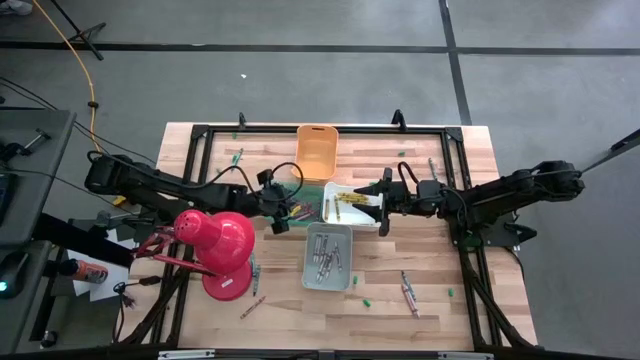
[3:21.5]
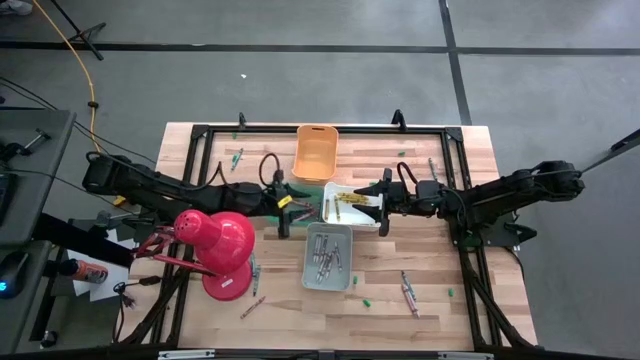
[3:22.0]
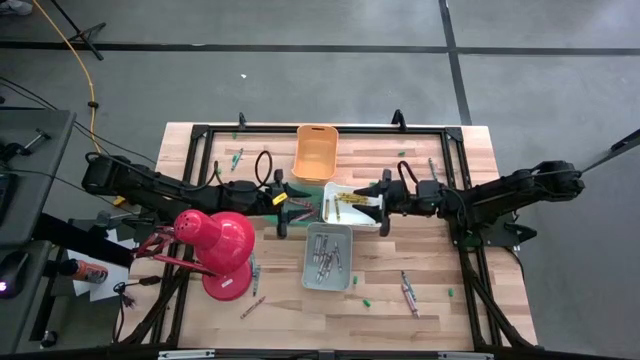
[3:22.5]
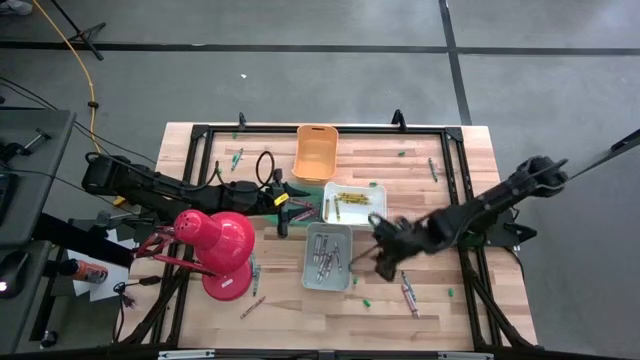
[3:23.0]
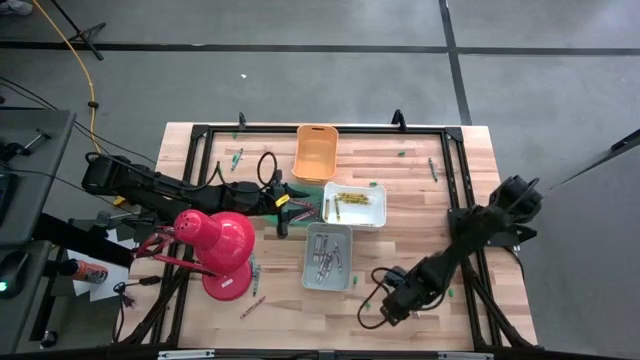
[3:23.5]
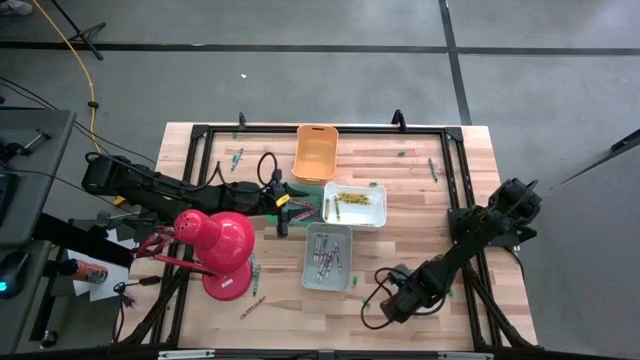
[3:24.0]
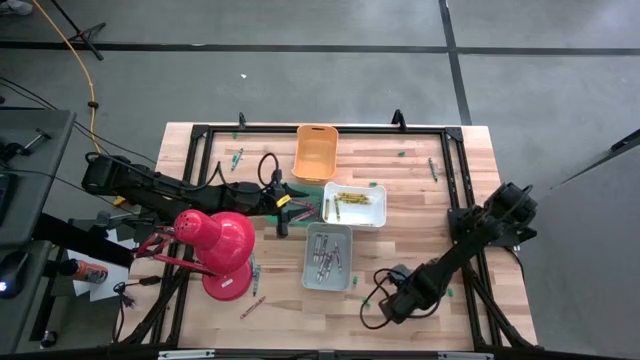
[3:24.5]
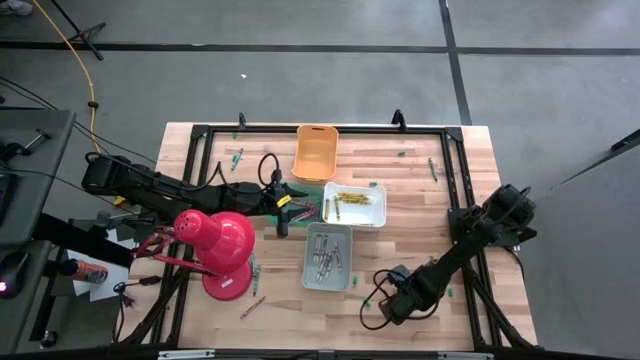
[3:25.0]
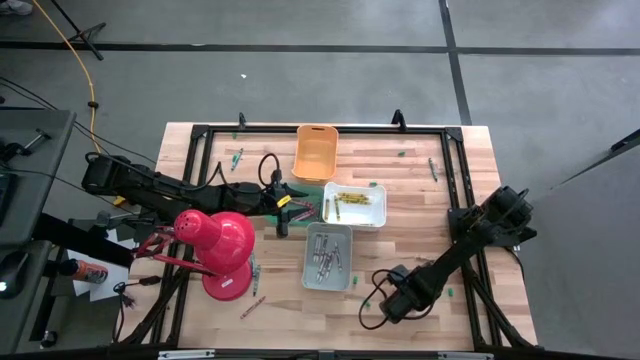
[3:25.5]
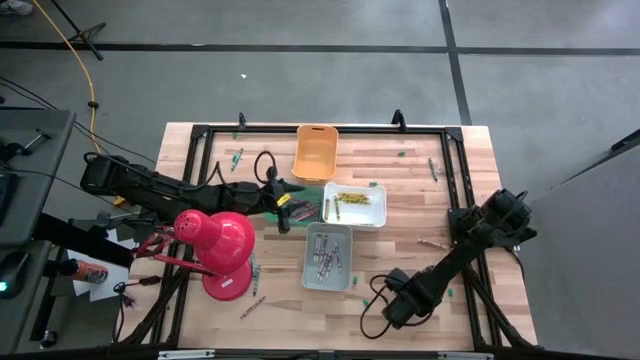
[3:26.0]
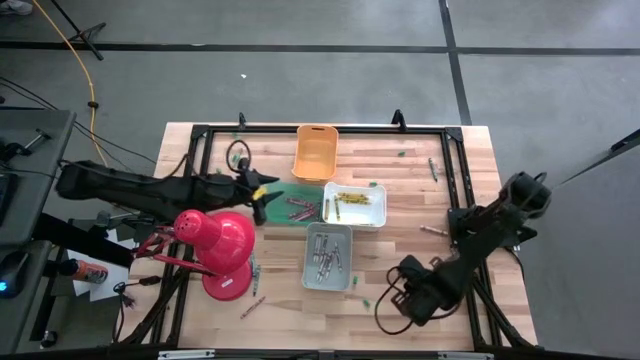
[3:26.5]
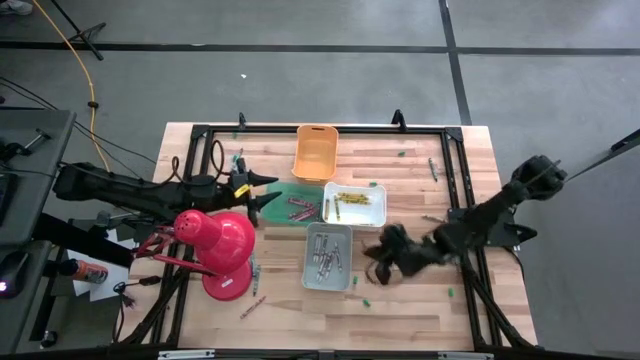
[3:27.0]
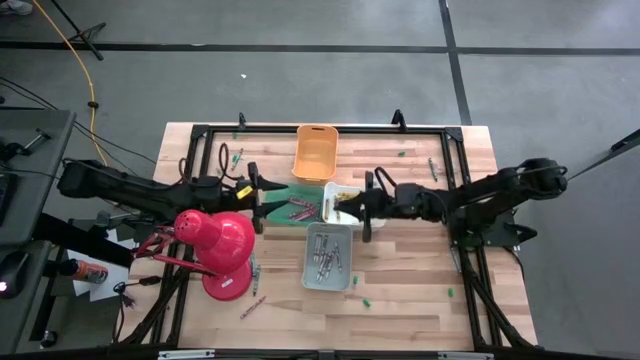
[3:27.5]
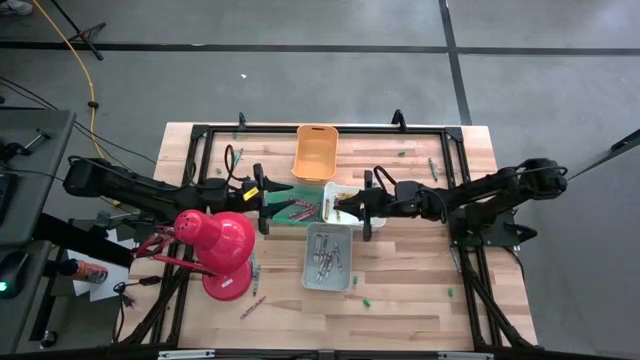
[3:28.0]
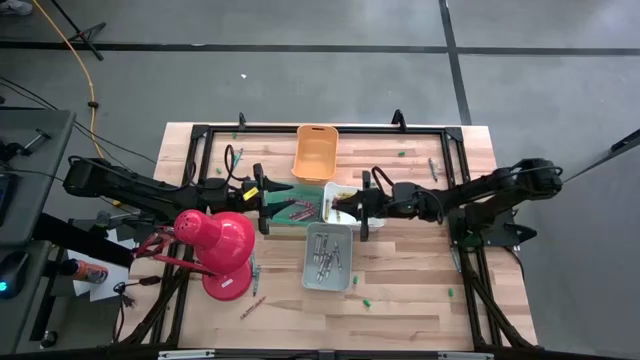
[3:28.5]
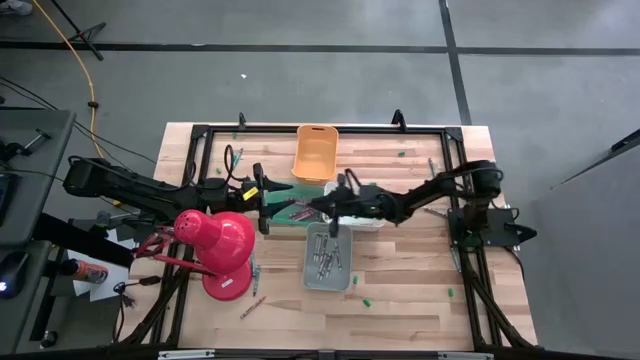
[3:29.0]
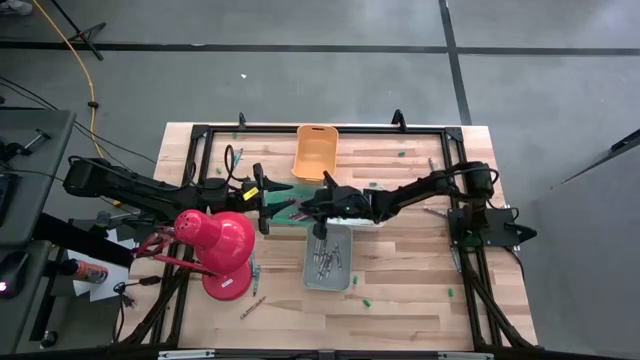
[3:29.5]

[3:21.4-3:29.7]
Task: Sort crayons
Put the pink crayon into the blue bin

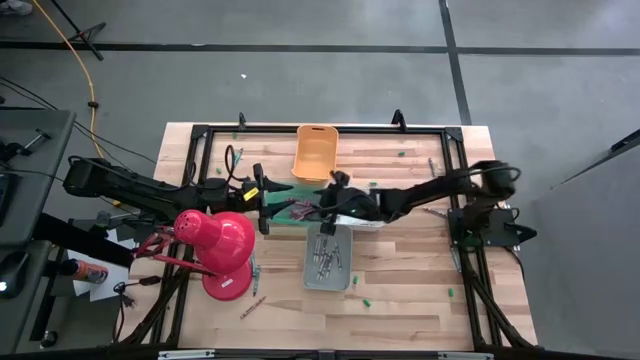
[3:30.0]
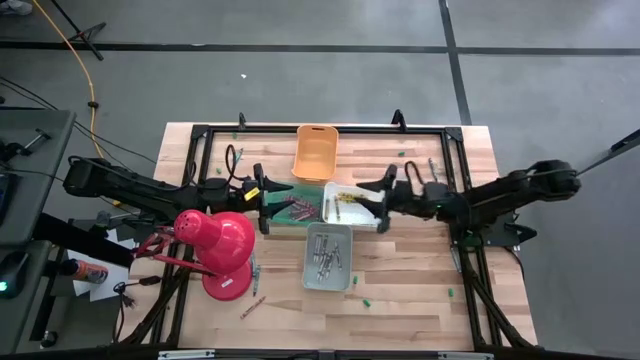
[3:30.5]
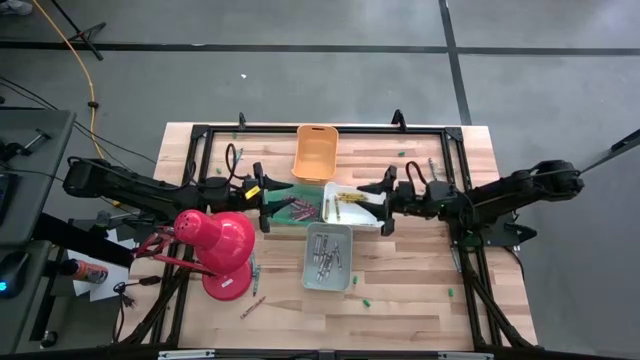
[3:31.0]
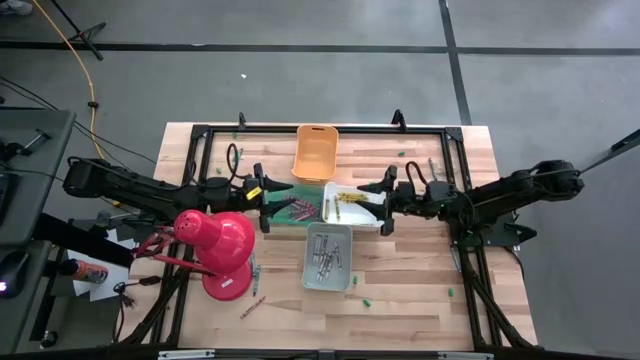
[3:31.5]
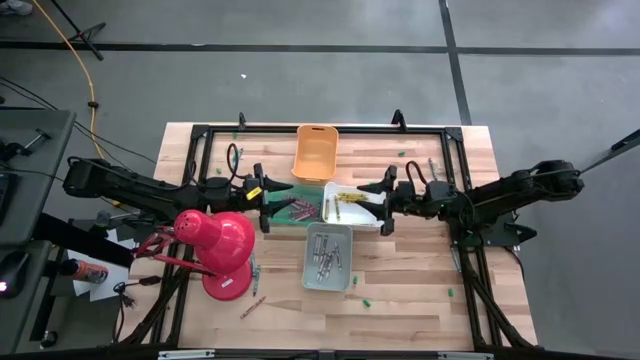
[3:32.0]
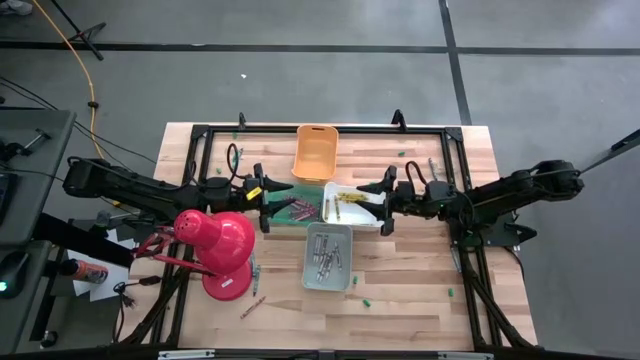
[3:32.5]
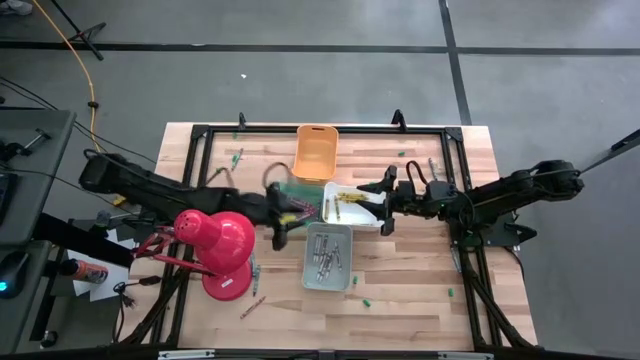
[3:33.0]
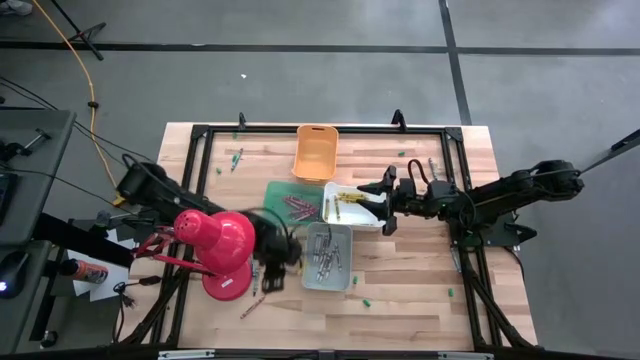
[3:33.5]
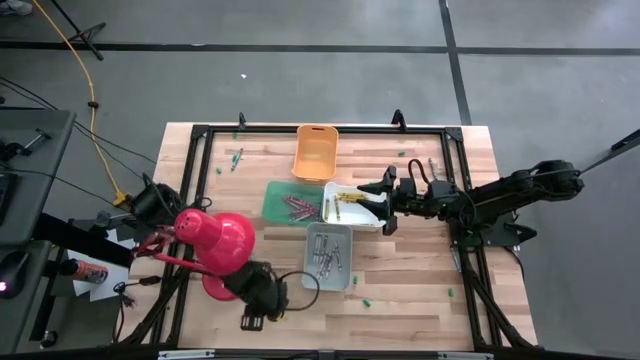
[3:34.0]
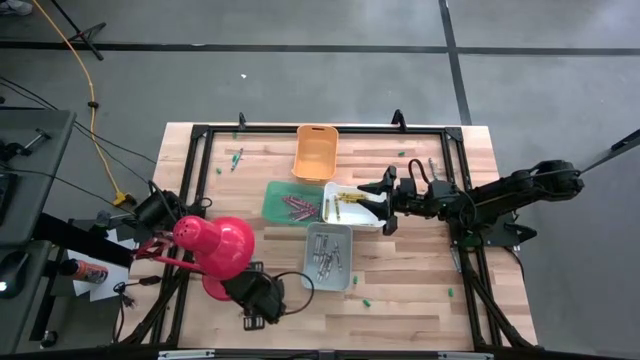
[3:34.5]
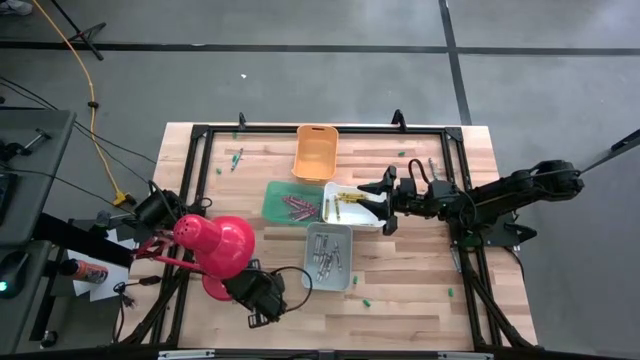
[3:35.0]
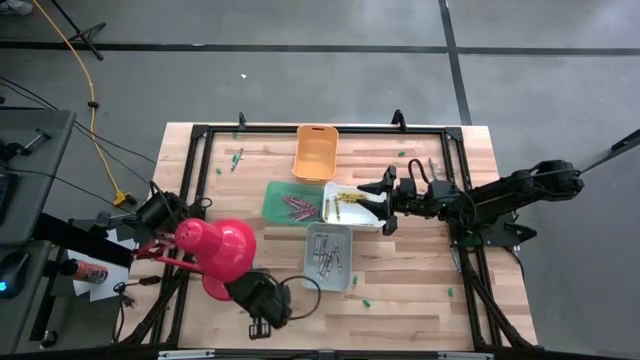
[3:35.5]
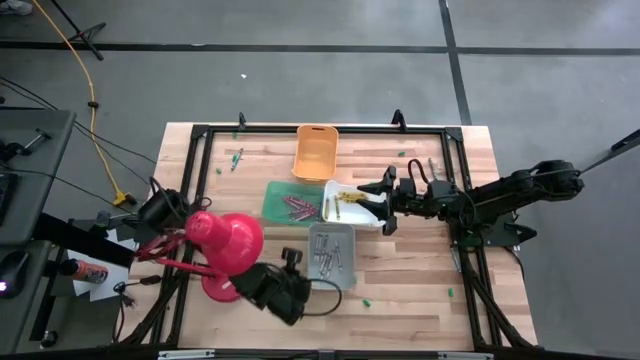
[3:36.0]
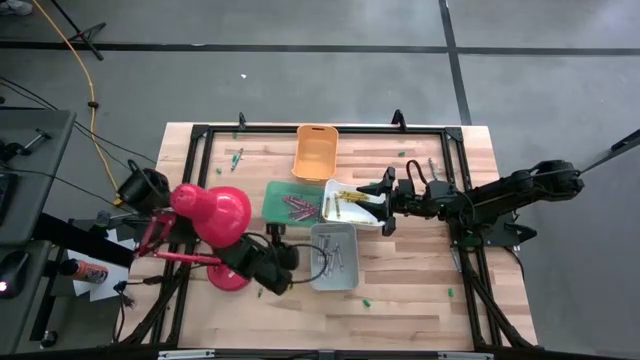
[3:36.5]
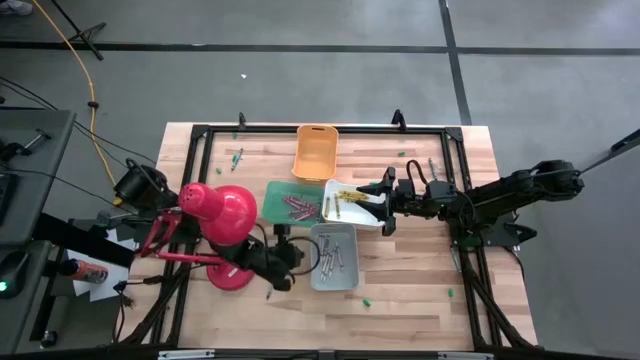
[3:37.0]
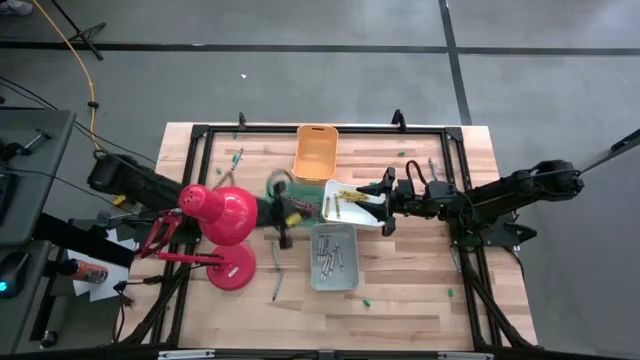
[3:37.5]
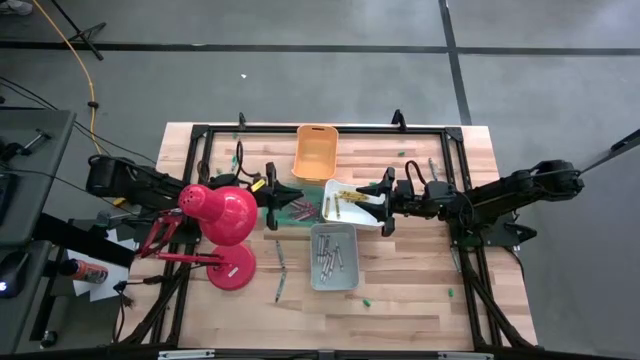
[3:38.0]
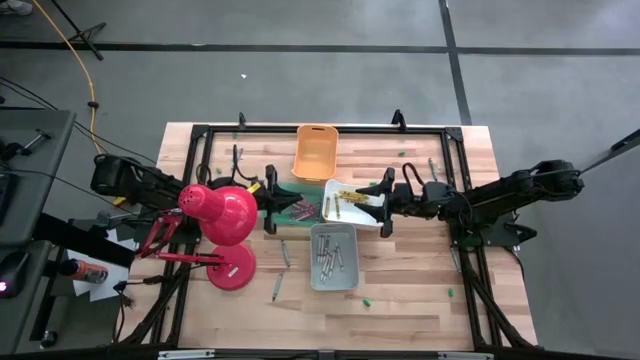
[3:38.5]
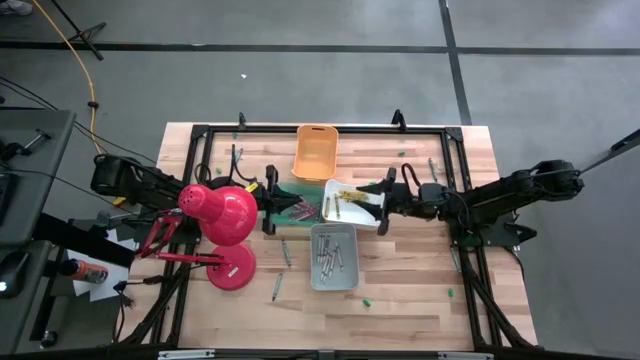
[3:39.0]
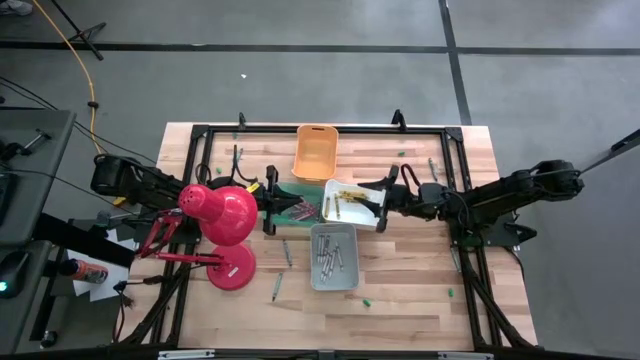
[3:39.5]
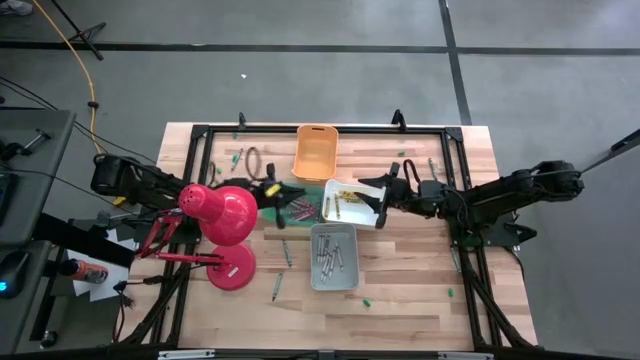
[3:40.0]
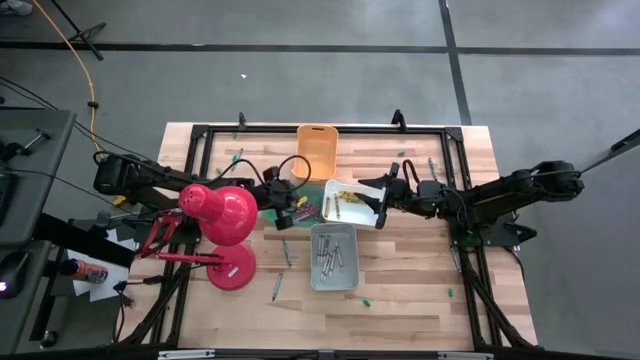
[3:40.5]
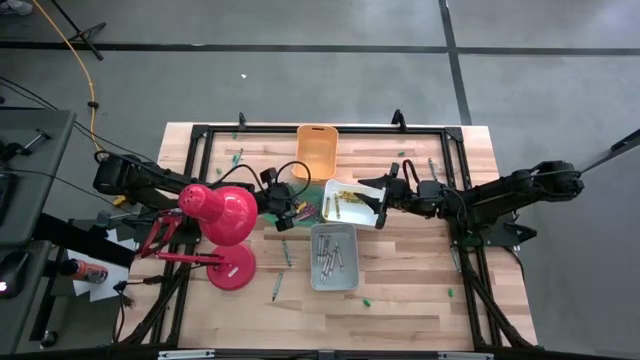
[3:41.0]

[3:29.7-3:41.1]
Put the pink crayon into the blue bin

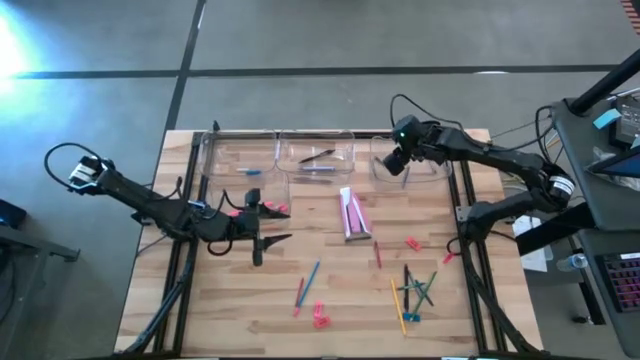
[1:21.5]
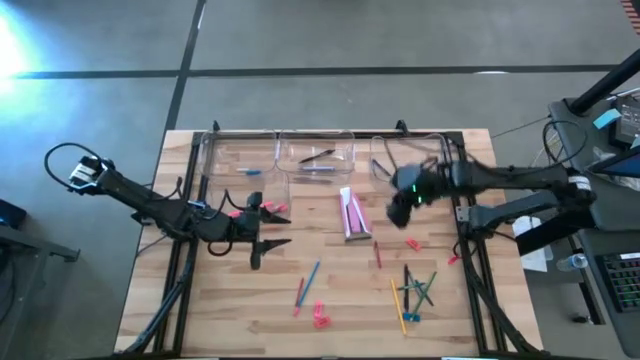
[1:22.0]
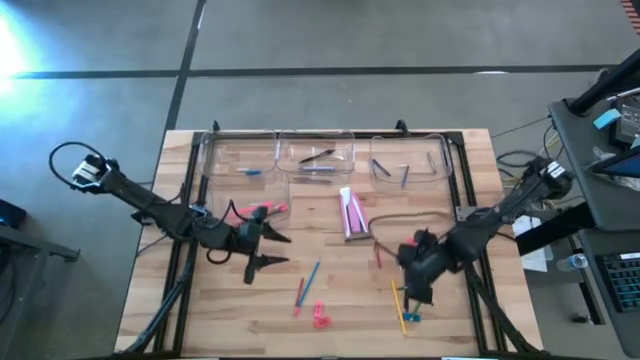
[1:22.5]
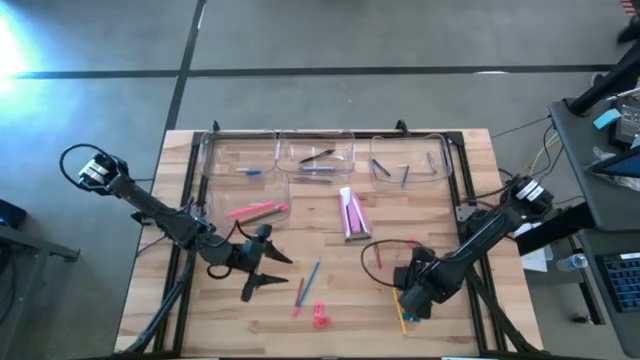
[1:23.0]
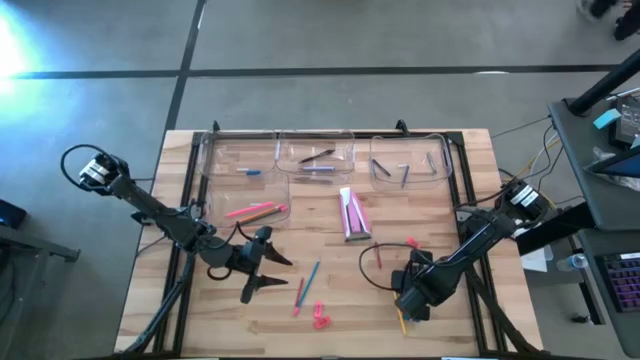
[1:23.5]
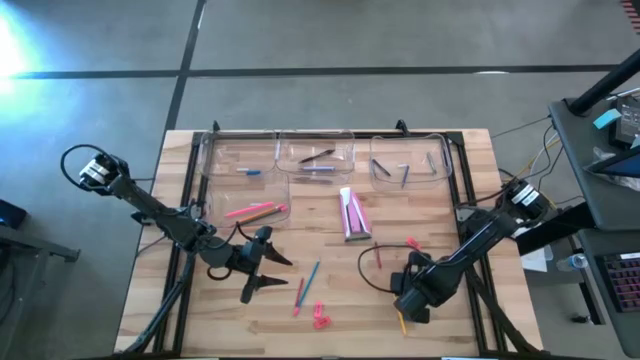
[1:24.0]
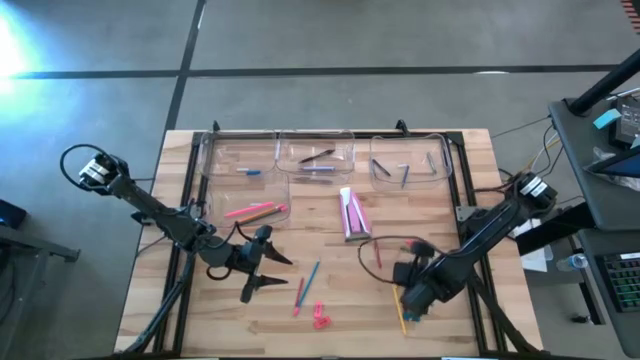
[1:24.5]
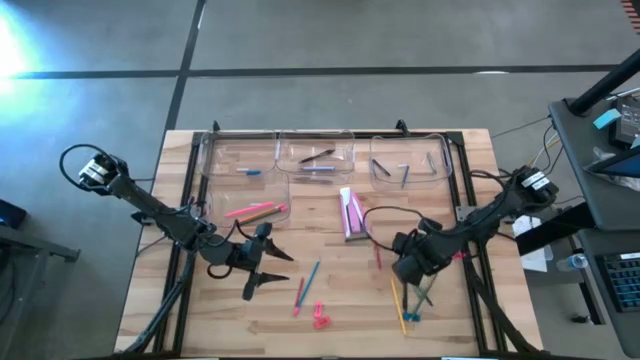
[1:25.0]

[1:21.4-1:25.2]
Task: Sort crayons/erasers/pens/pencils in bins
Put the green crayon into the top right transparent bin
